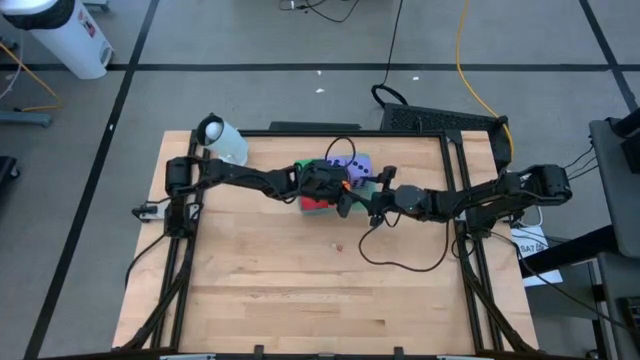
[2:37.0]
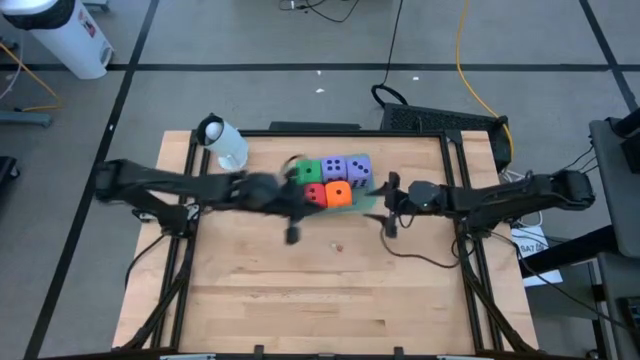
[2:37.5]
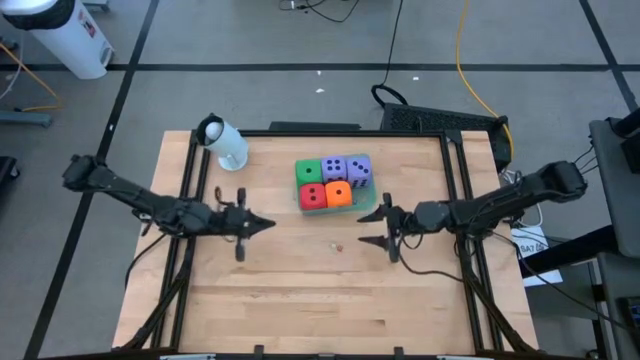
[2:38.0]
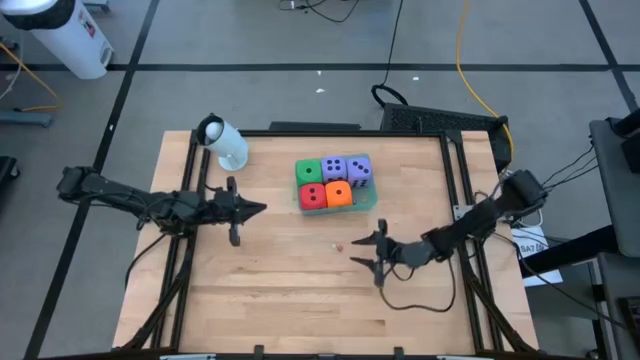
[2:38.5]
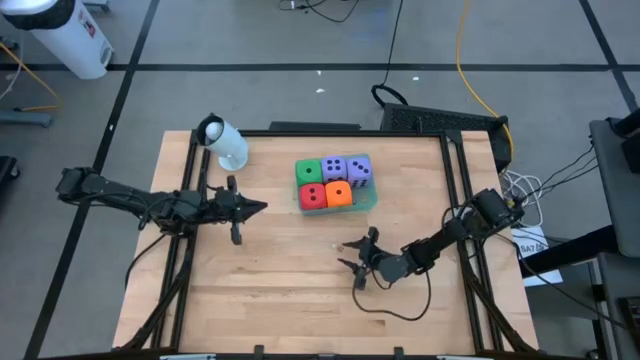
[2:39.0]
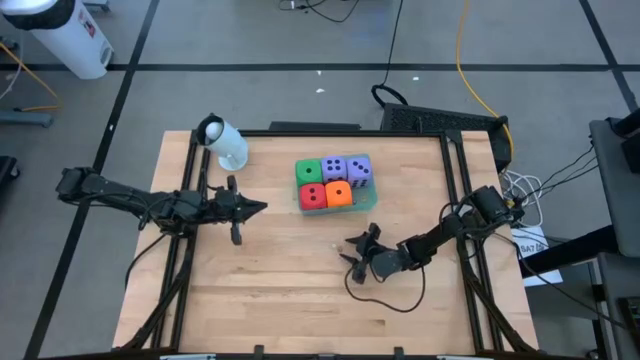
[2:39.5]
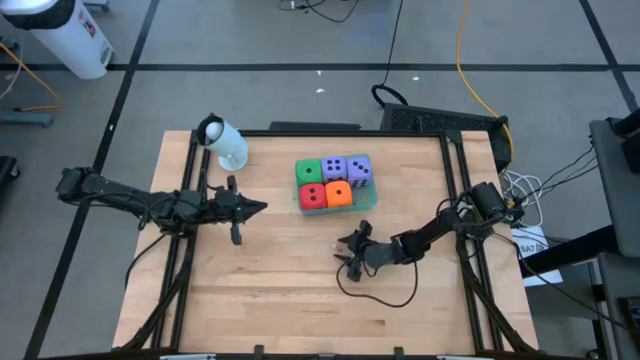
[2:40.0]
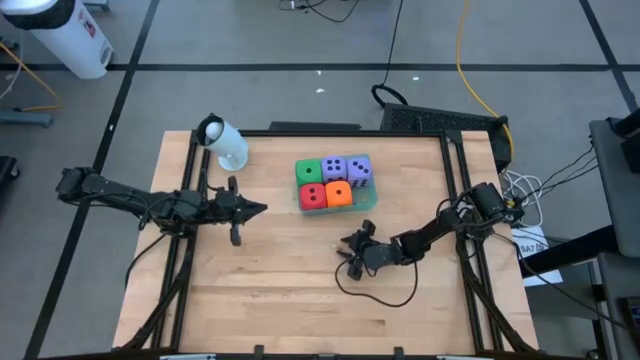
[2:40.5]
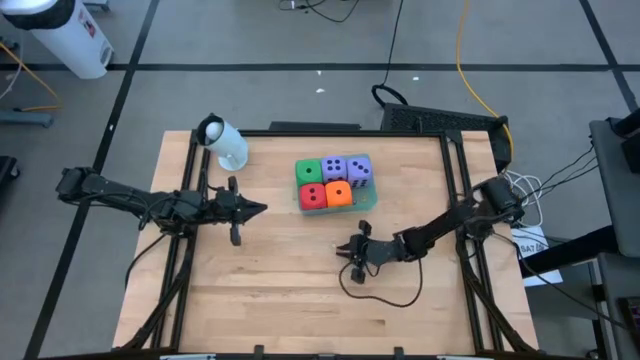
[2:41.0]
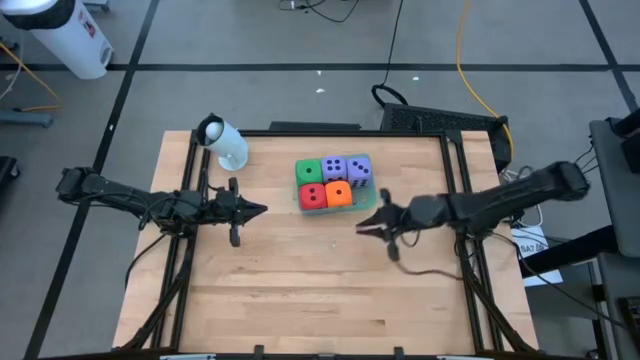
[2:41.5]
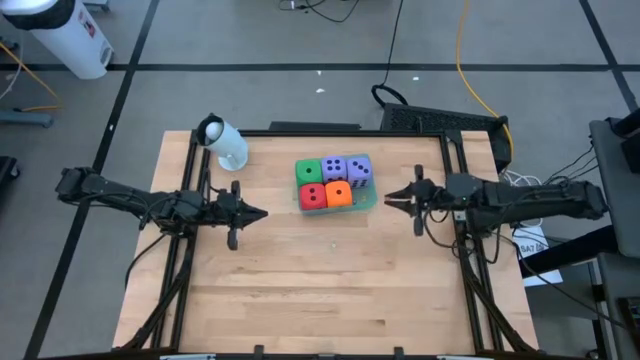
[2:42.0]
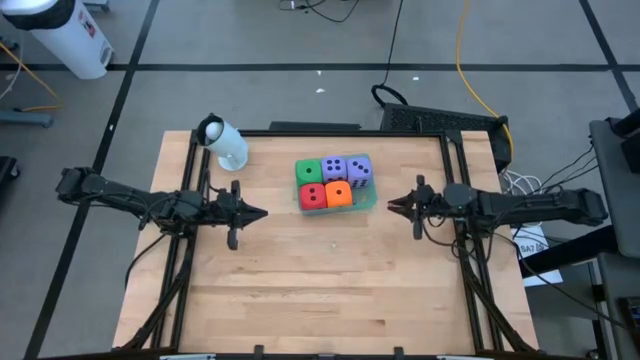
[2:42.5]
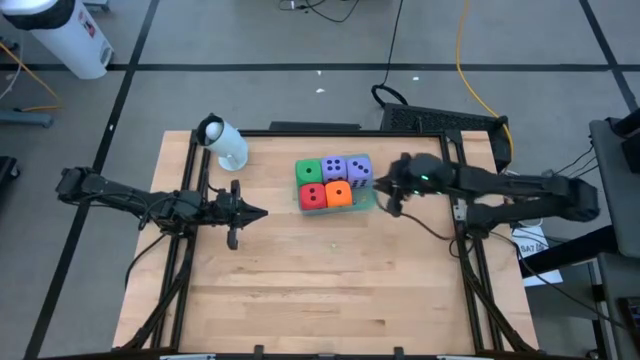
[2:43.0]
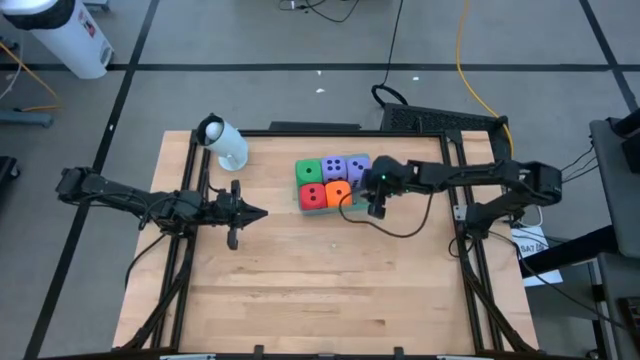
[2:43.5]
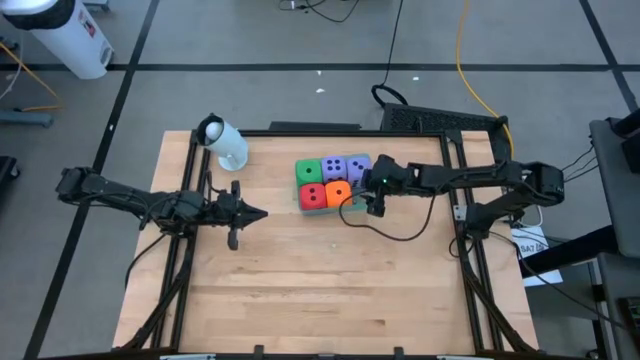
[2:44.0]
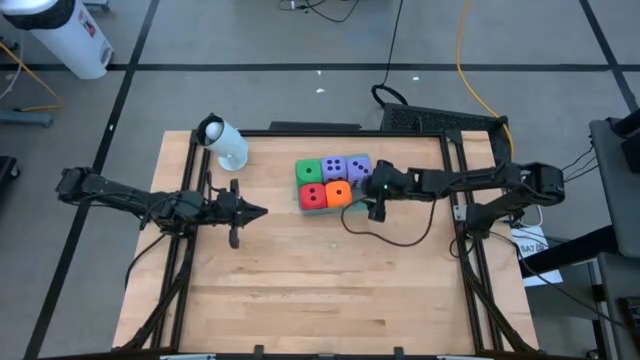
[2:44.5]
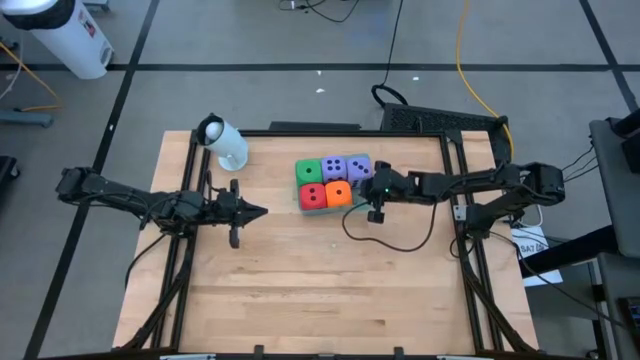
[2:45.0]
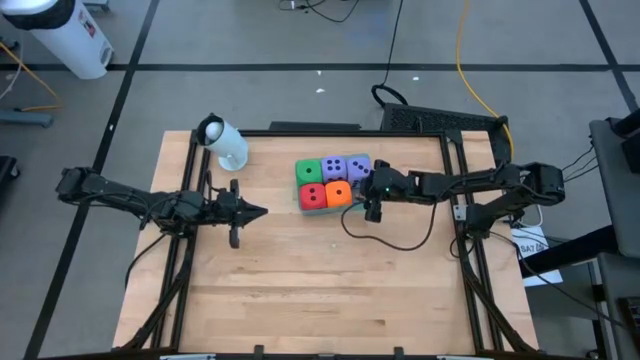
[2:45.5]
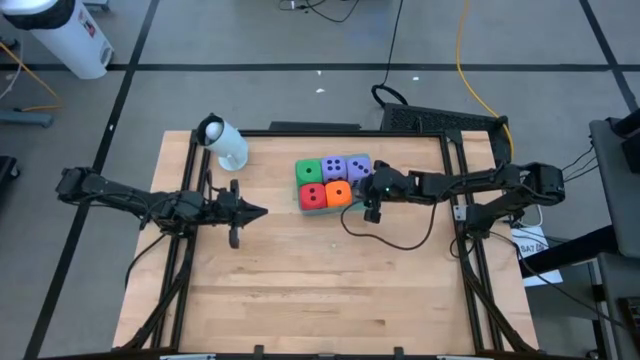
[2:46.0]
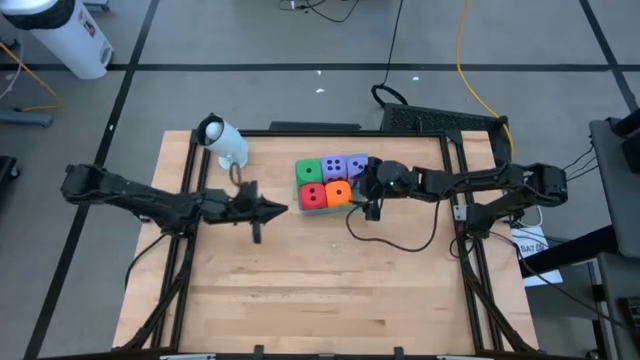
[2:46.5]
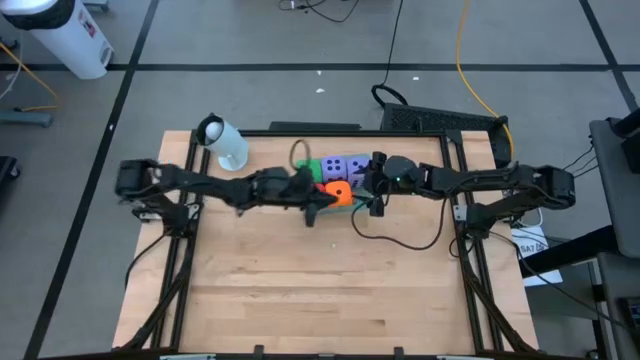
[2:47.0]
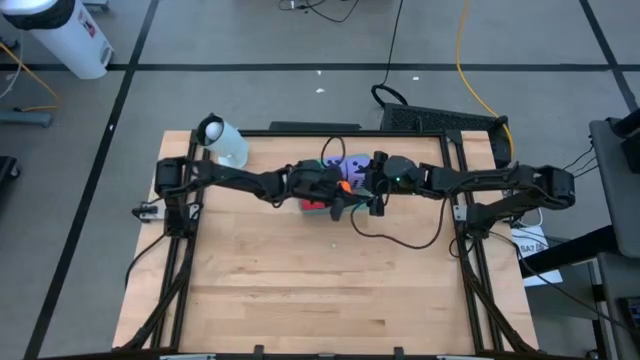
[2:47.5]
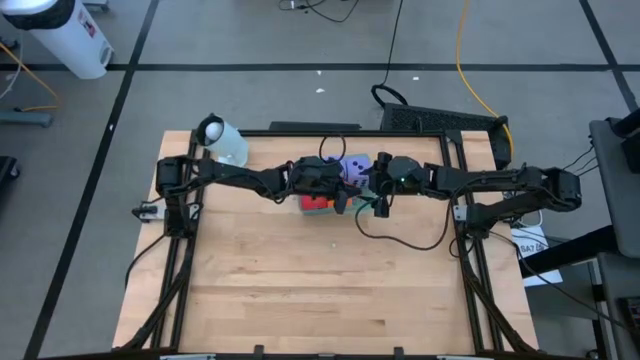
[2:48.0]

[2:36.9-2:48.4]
Task: Pick & Place Dice
Put the small red dice into the blue bin

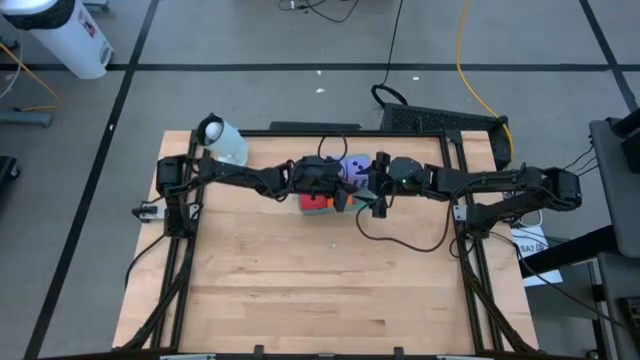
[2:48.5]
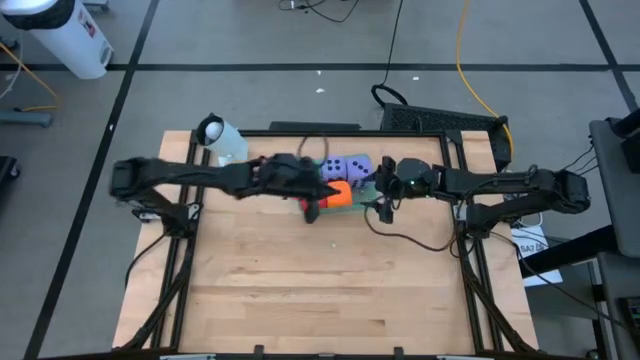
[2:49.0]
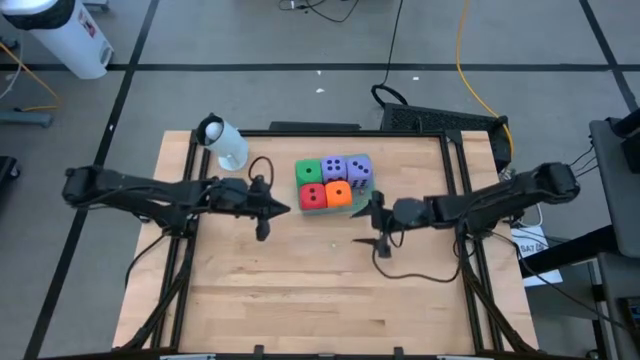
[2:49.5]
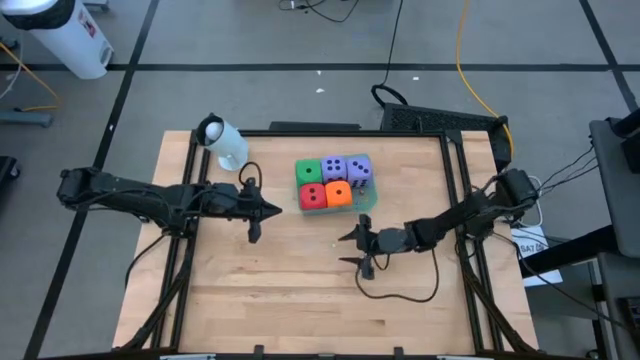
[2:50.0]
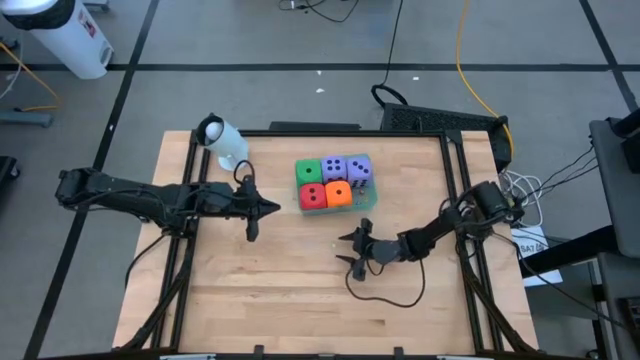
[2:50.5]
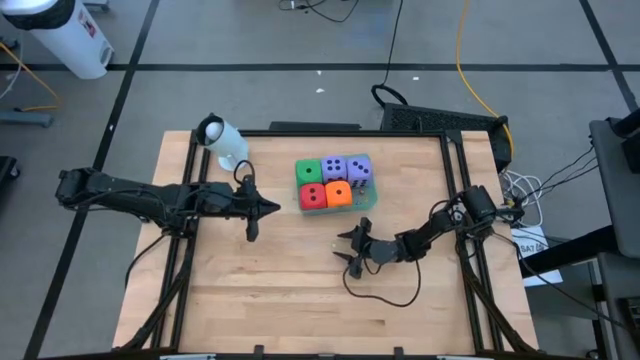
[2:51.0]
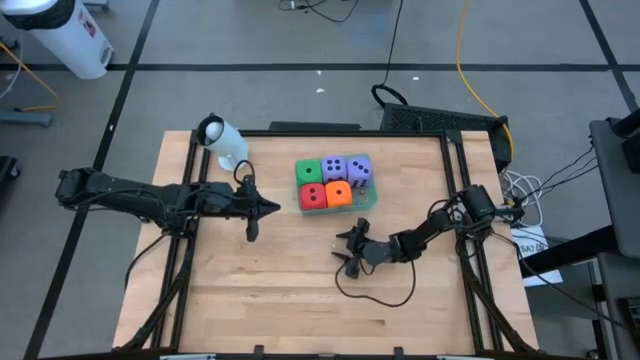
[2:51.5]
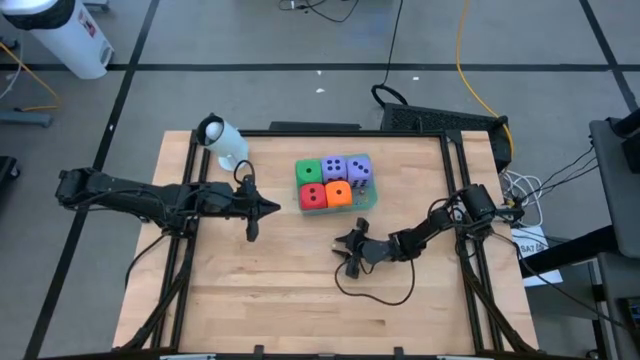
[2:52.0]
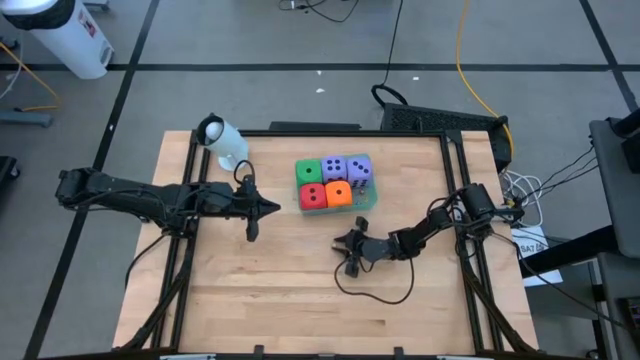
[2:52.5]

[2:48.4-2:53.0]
Put the small light yellow dice into the blue bin

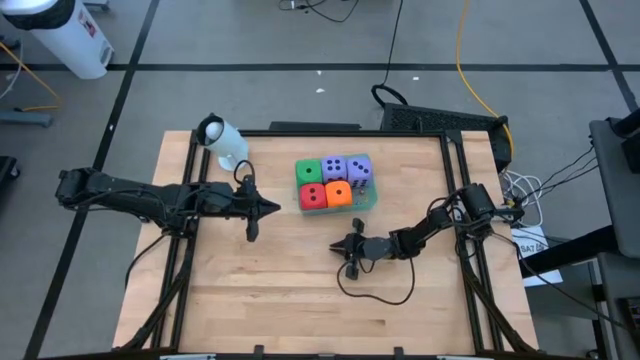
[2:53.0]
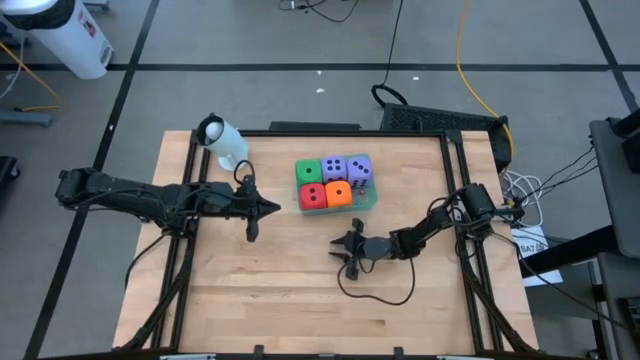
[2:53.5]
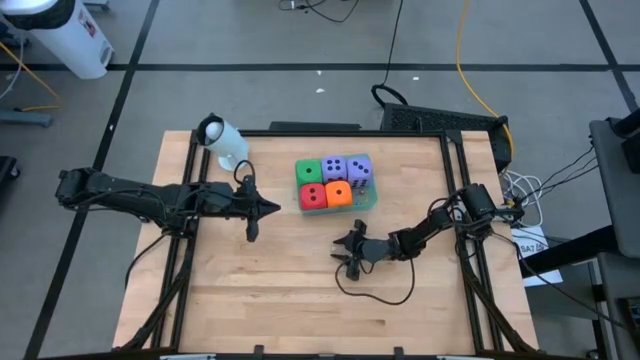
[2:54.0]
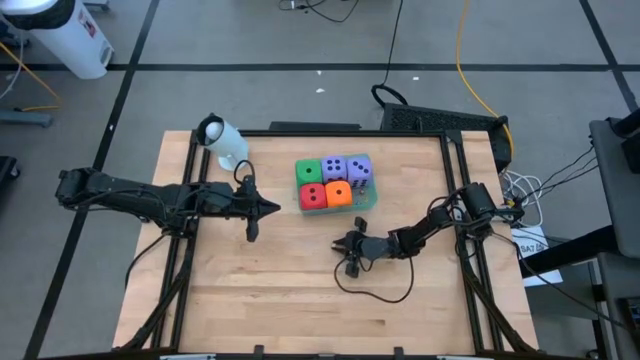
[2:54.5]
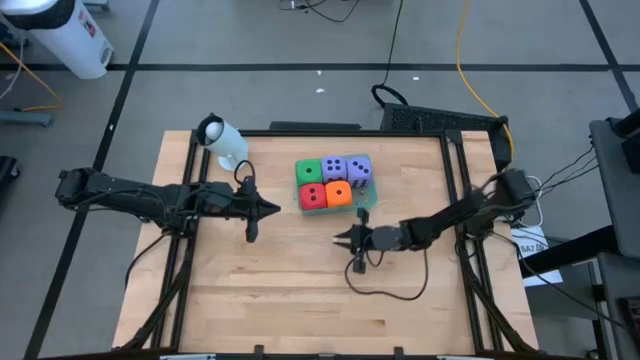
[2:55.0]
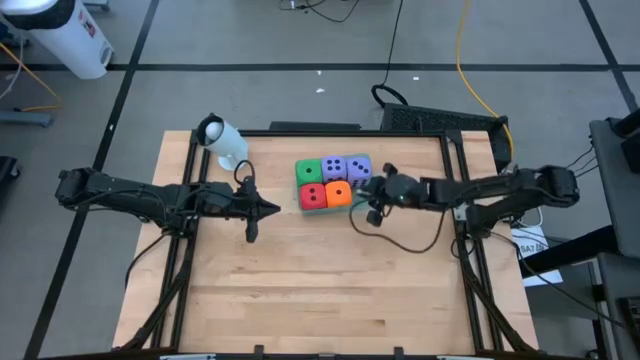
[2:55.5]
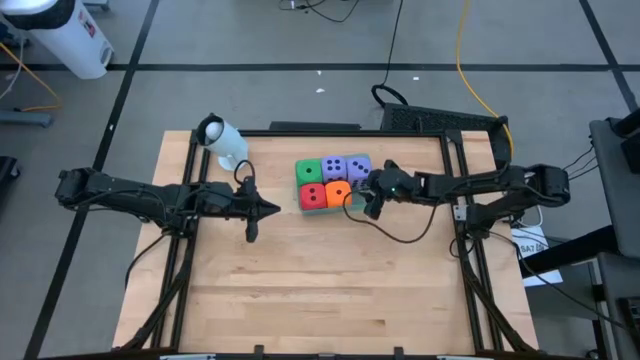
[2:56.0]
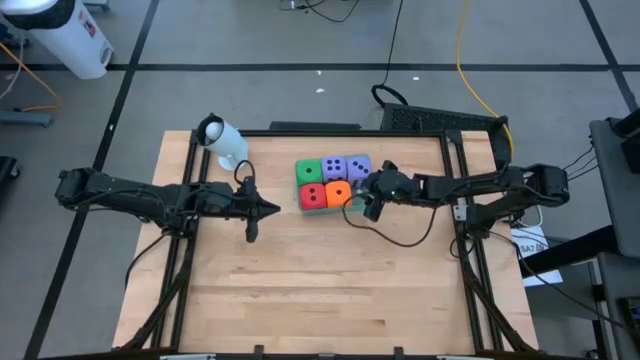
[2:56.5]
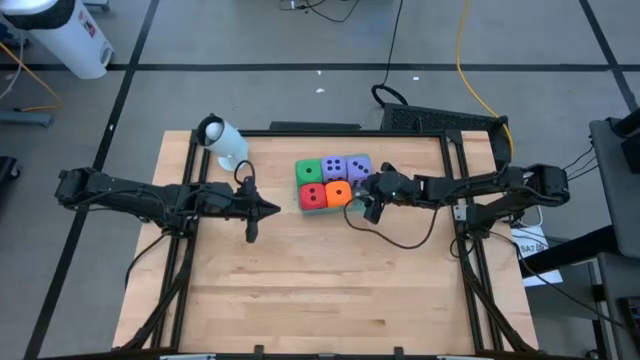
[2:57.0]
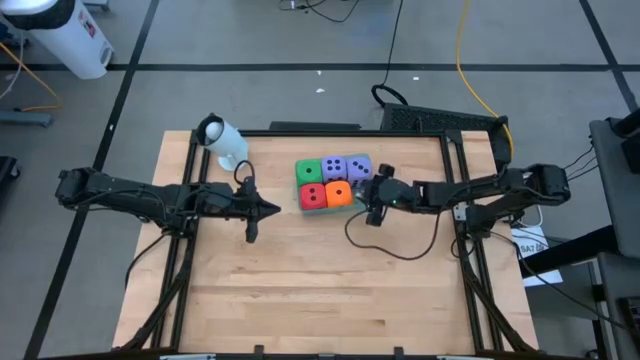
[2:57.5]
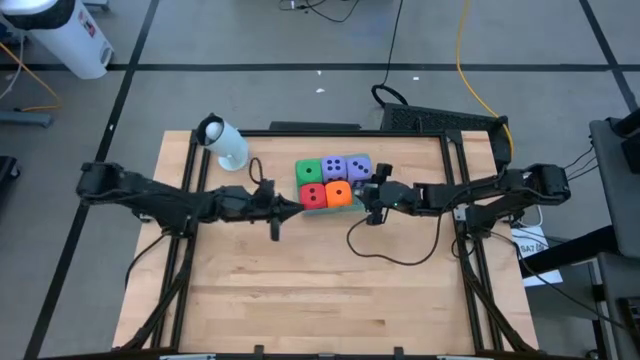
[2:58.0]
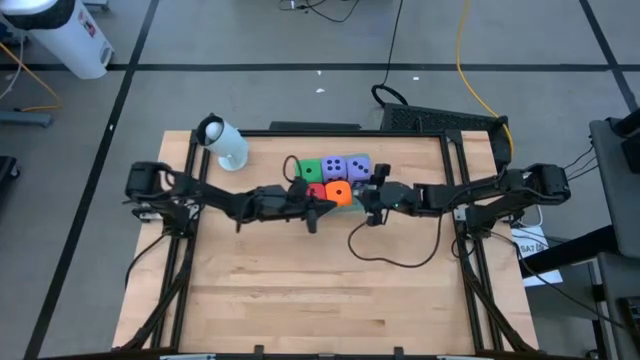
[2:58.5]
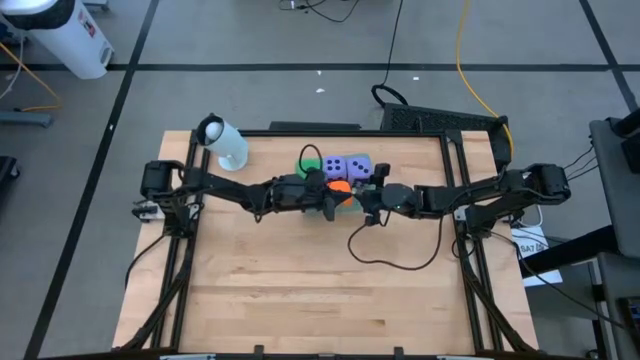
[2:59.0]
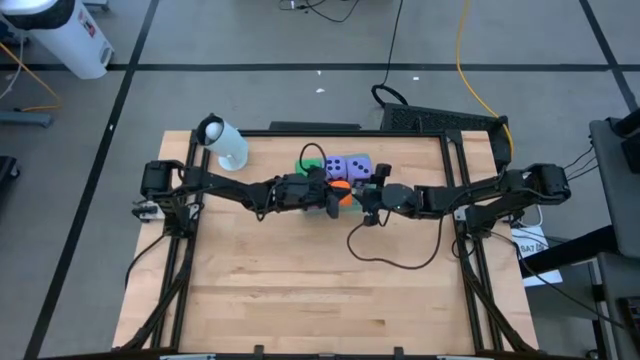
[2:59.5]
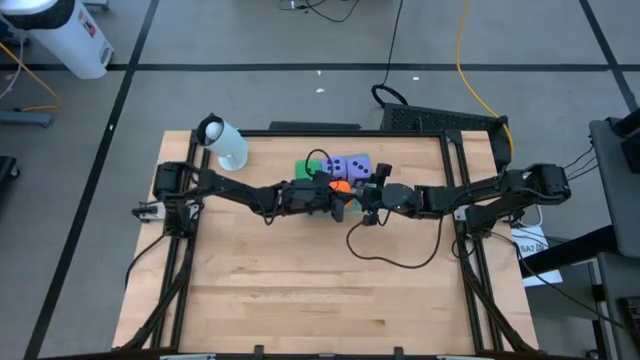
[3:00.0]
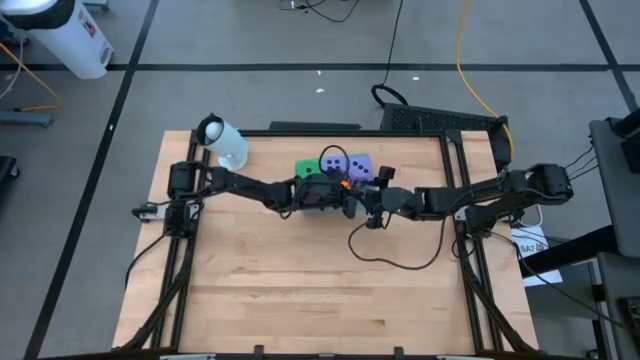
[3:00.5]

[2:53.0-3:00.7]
Put the small light yellow dice into the blue bin
